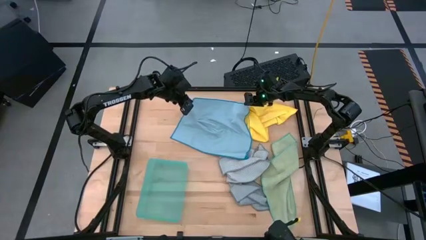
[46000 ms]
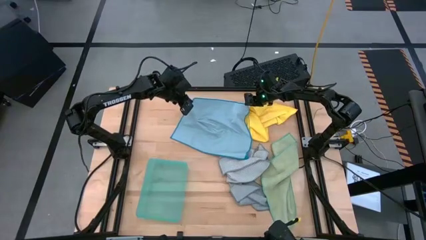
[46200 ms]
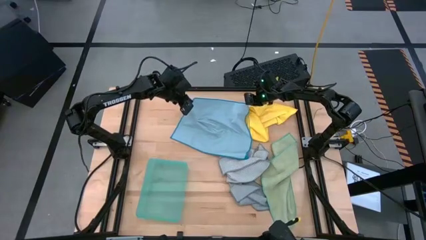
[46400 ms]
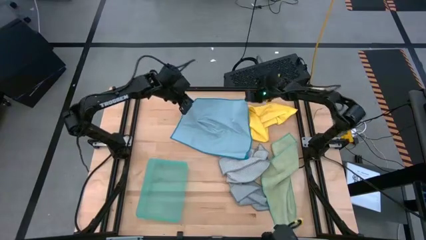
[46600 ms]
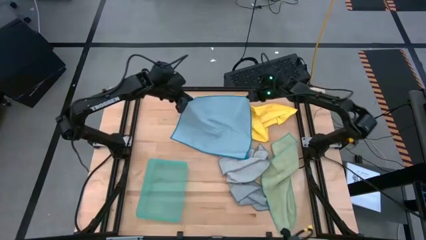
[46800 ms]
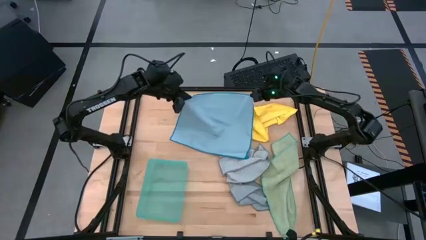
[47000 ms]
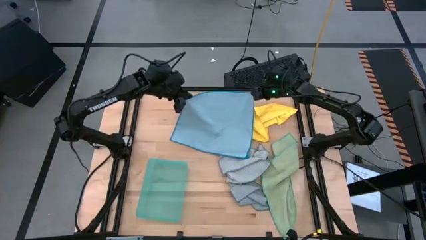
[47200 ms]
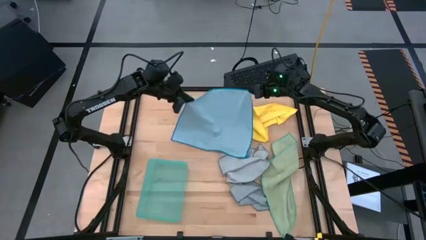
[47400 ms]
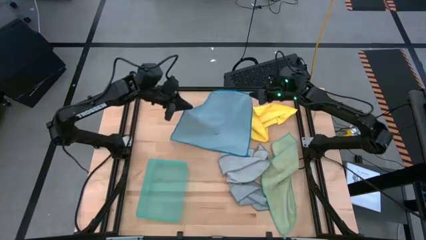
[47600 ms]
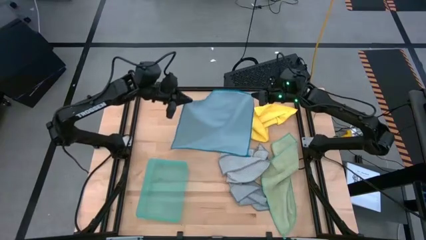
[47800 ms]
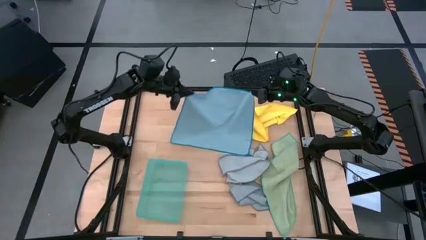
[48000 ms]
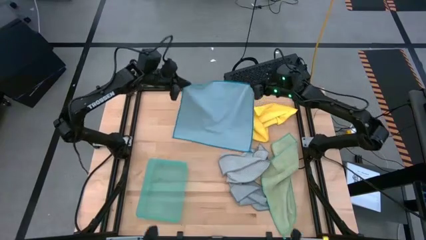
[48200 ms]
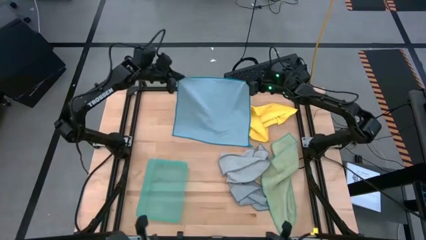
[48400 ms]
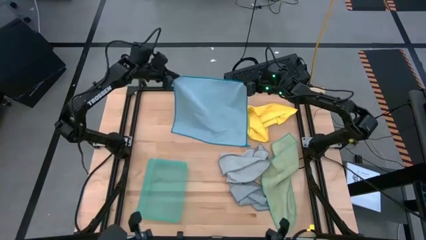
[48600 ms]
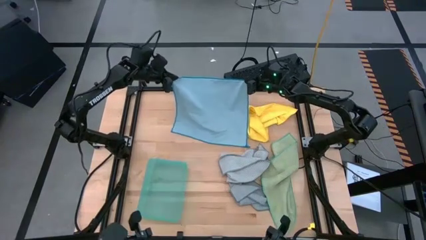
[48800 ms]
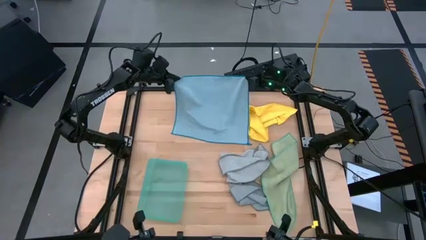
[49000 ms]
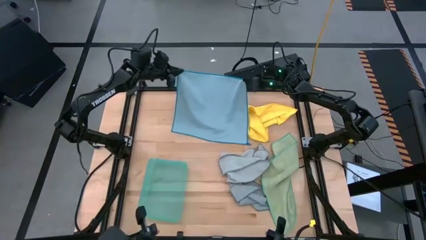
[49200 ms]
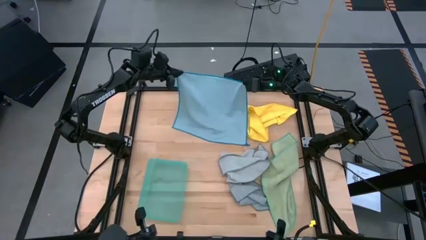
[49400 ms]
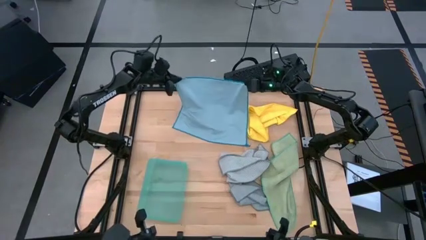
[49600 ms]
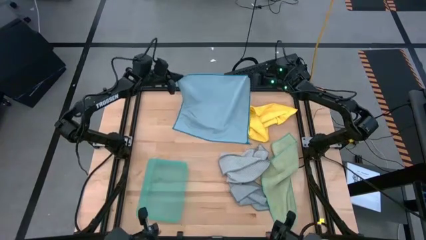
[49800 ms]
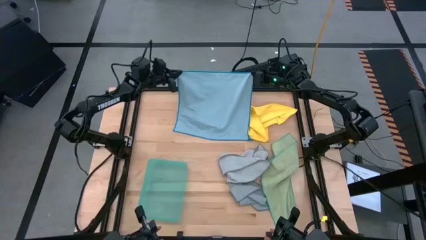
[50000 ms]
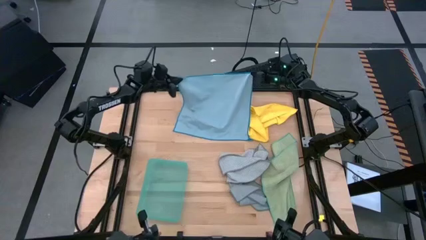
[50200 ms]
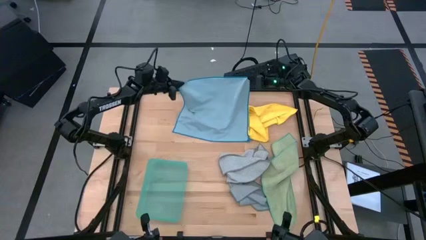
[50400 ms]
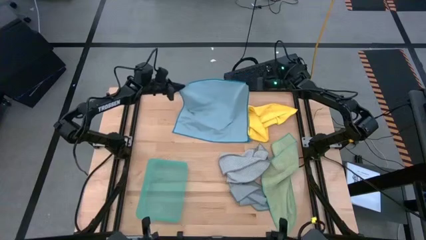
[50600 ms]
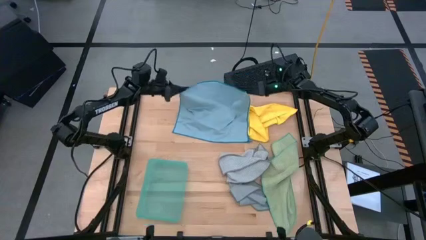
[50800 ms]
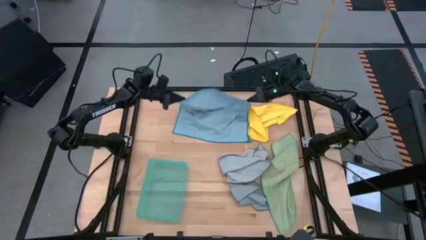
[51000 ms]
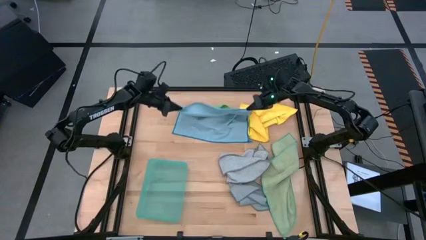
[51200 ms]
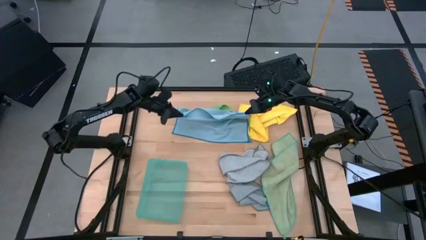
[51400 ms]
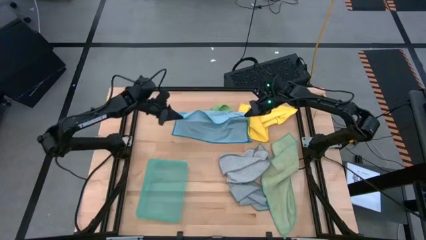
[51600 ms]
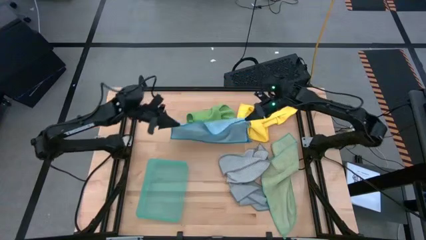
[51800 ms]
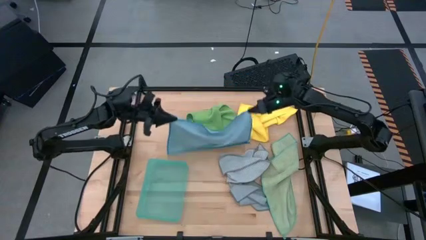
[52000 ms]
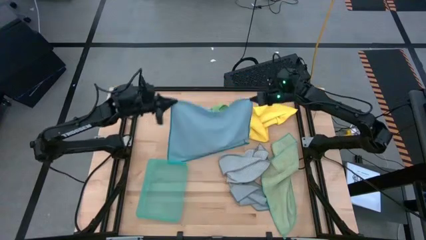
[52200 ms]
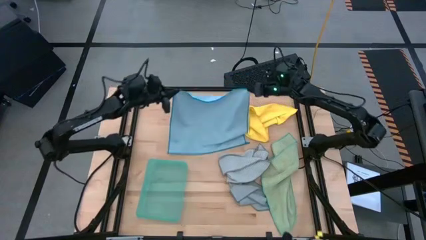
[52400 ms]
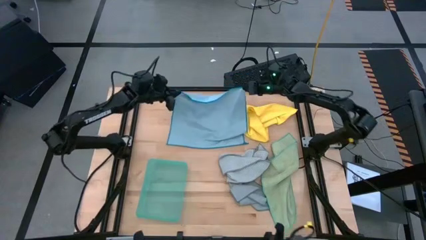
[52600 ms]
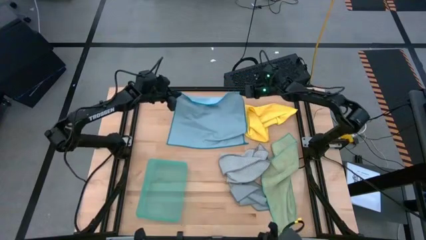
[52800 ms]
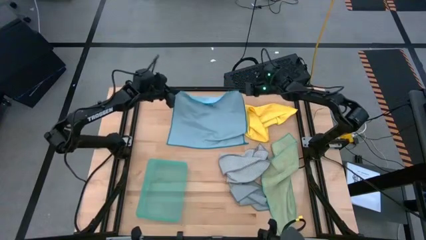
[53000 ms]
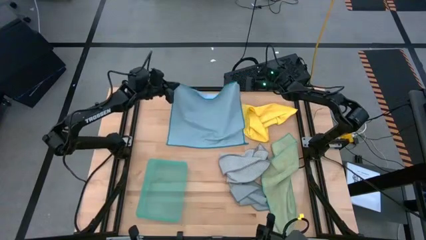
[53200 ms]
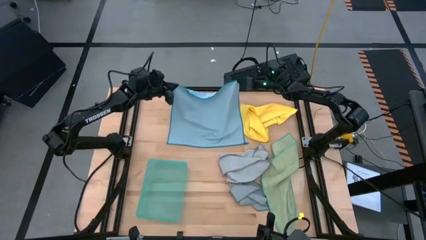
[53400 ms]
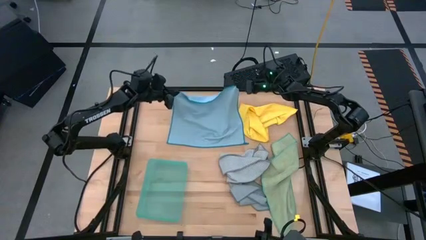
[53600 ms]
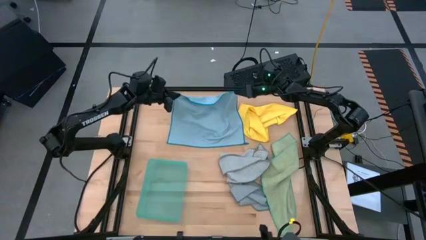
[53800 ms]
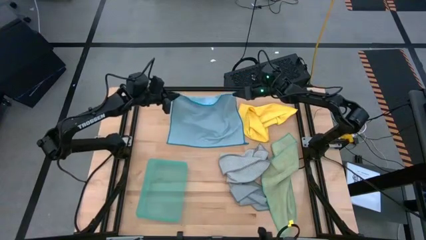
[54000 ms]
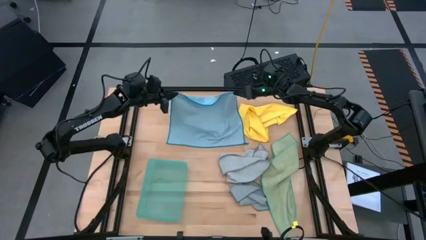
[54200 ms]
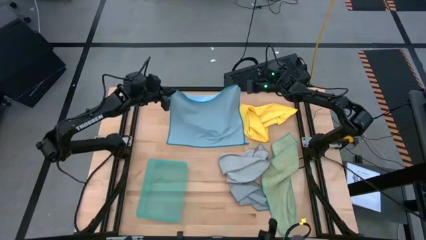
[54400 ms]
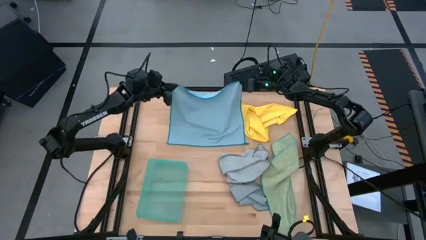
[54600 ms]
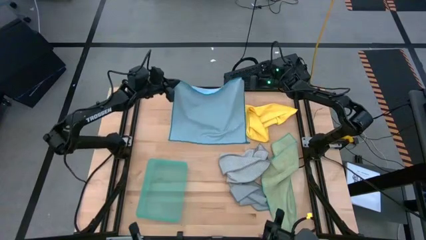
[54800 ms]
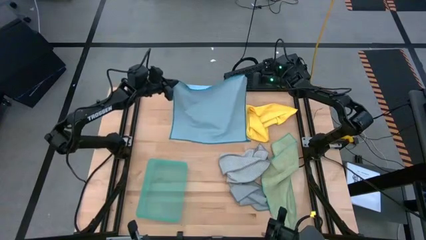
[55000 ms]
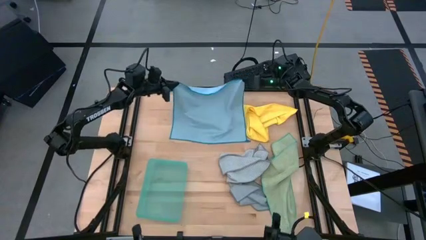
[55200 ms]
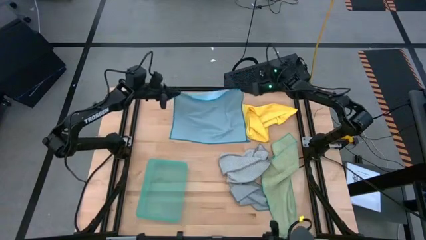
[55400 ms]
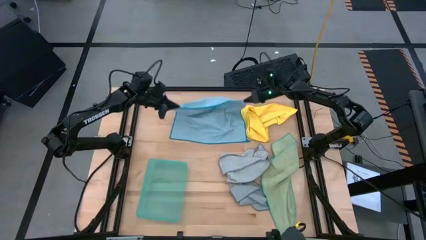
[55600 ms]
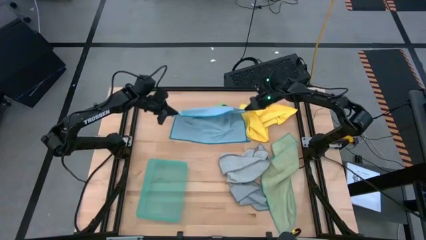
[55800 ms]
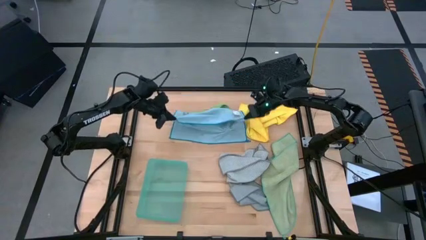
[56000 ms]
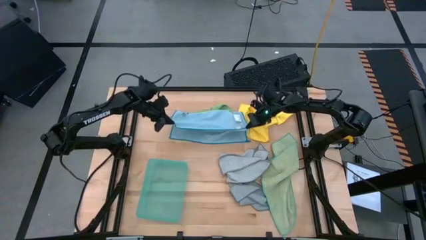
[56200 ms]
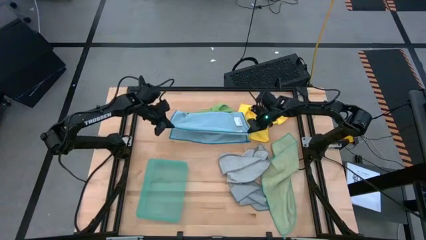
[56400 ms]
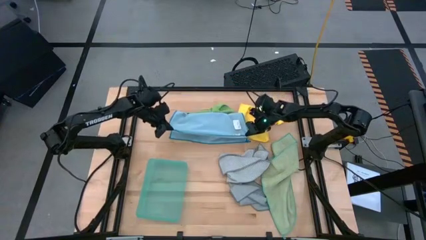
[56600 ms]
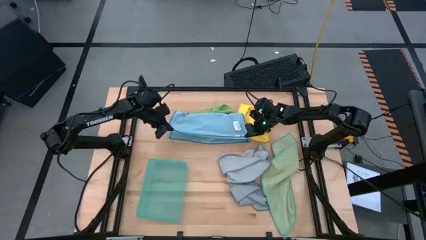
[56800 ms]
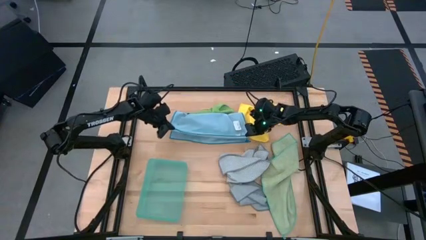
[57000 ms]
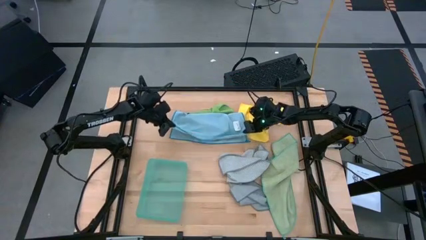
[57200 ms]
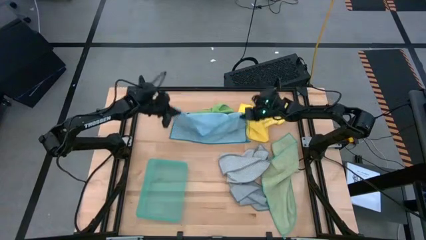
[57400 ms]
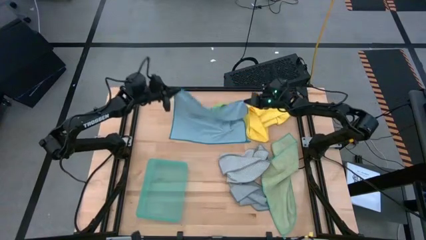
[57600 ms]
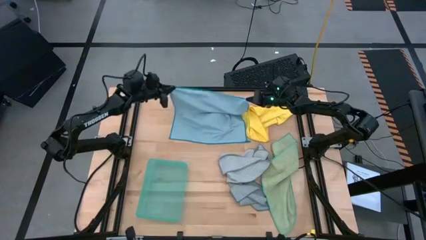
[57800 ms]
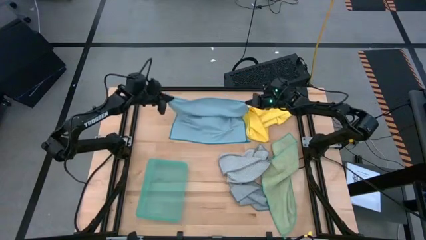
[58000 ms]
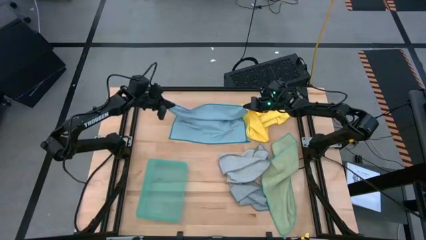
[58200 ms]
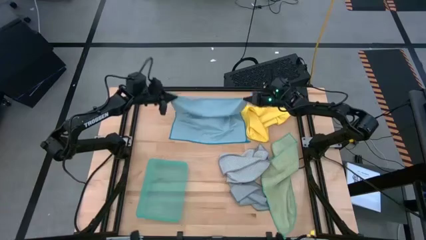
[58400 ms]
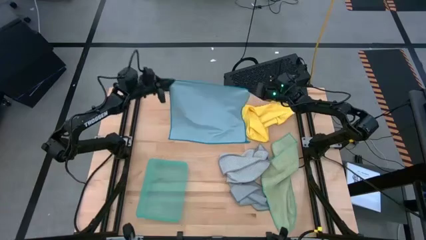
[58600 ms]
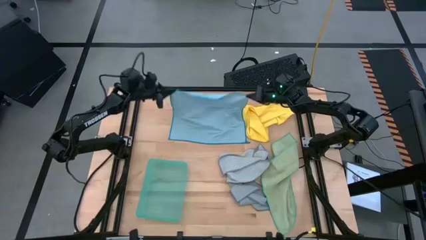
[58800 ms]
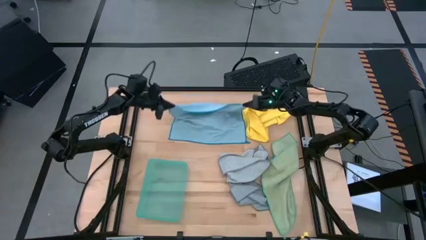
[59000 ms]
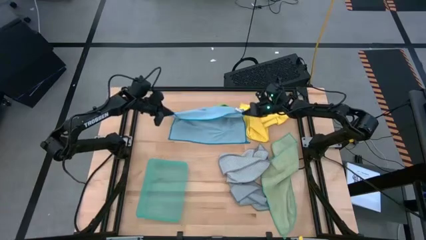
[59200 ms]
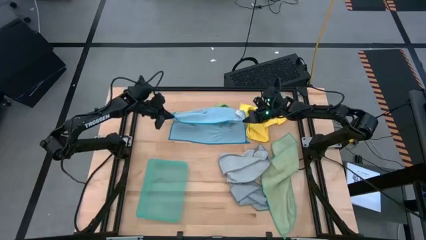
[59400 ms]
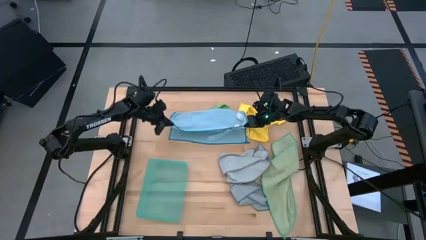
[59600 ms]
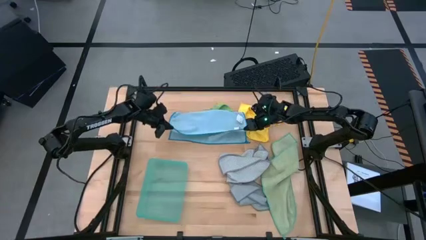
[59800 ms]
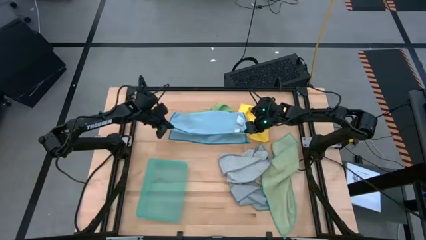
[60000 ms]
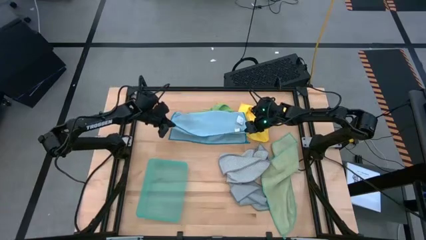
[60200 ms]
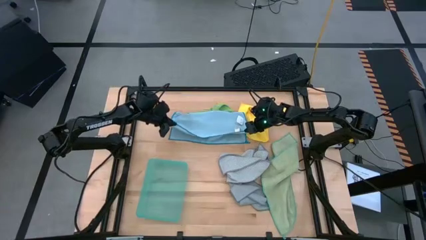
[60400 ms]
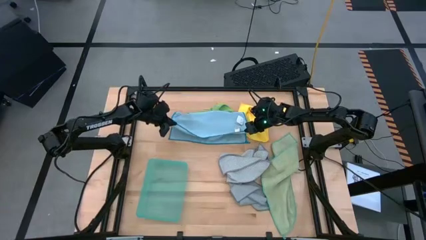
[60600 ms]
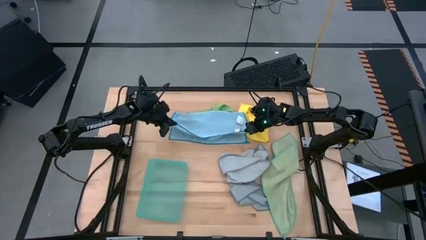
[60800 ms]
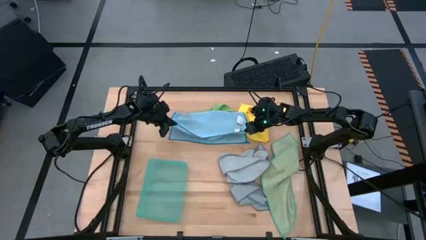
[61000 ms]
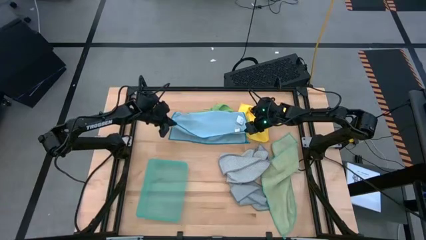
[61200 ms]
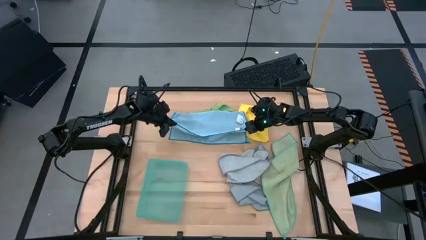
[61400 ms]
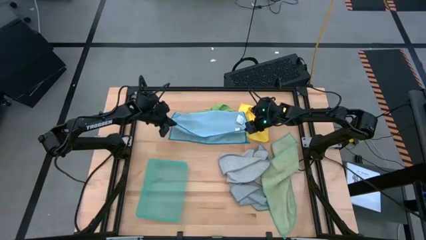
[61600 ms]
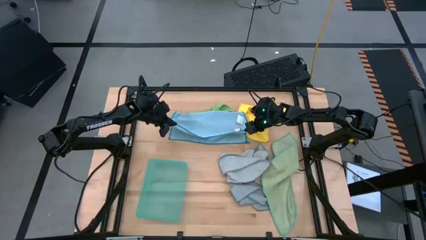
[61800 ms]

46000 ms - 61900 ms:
Task: Fold microfiber towels
Fold the blue microfiber cloth

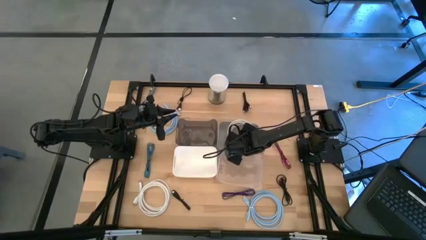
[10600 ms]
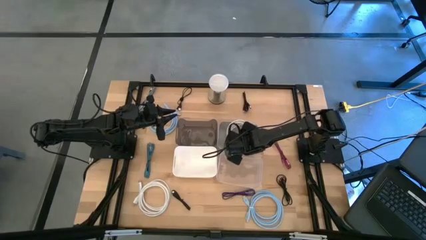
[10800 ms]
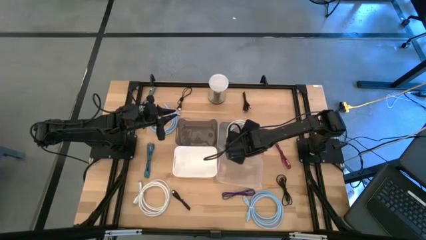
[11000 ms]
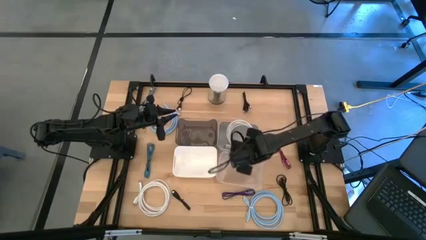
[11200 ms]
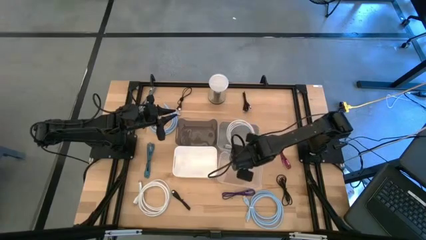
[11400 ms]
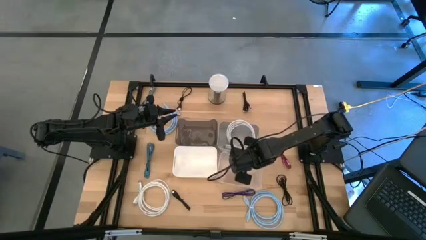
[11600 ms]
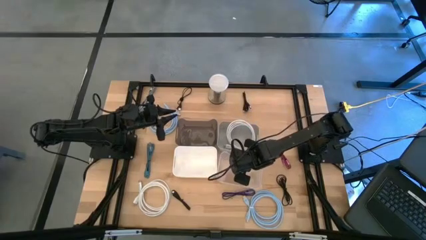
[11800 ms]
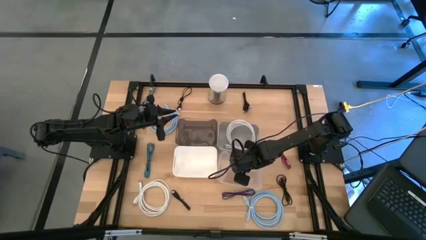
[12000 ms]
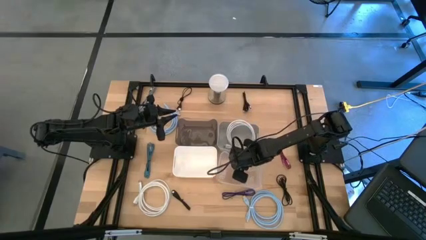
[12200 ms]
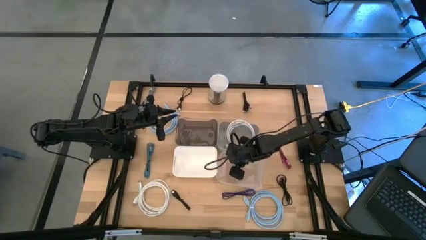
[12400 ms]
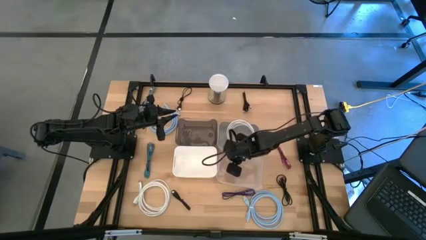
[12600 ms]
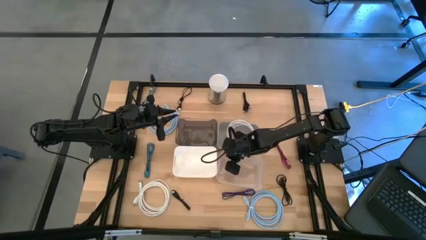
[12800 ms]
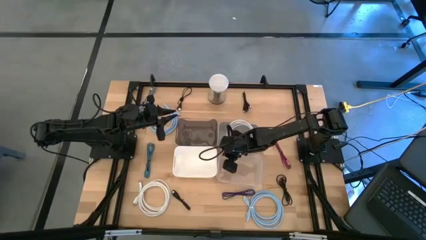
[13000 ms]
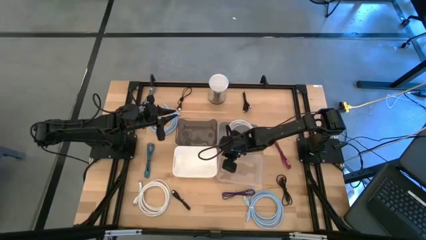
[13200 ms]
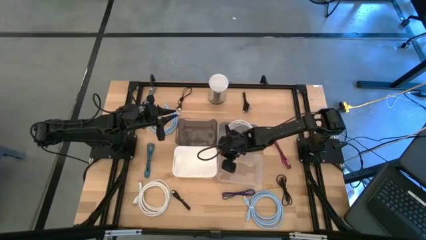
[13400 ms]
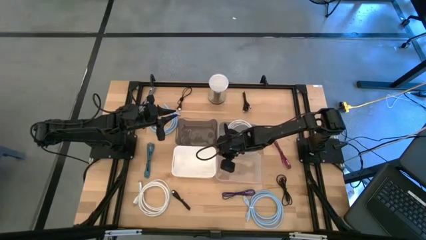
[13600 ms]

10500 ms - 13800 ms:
Task: Pick & Place USB Port
Adjust the transparent bin on the table
